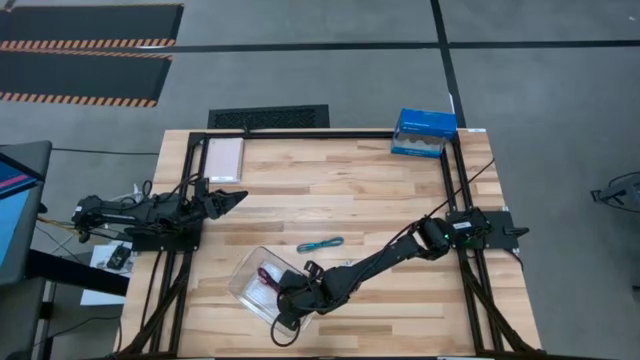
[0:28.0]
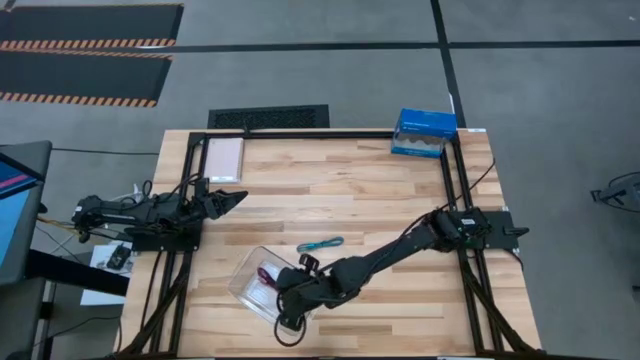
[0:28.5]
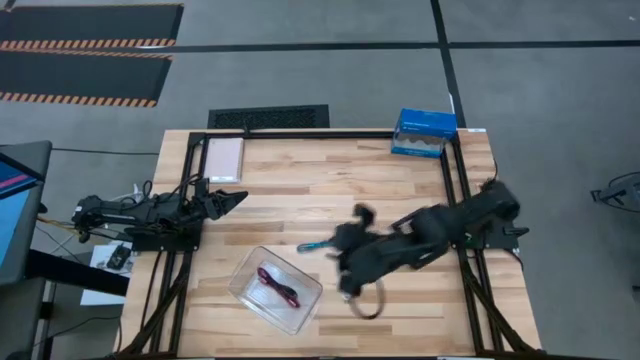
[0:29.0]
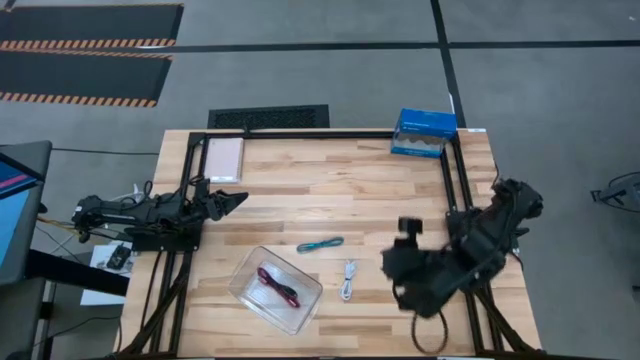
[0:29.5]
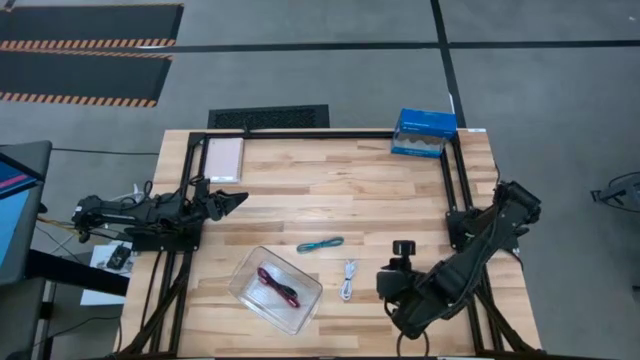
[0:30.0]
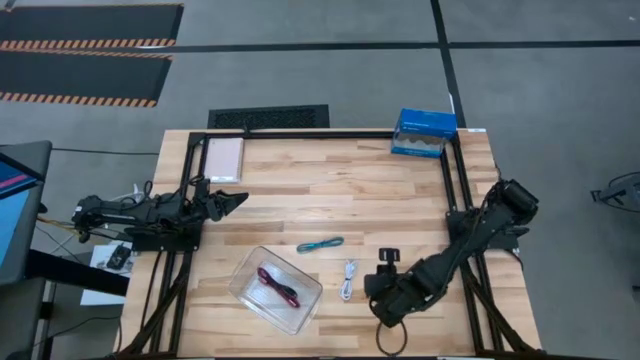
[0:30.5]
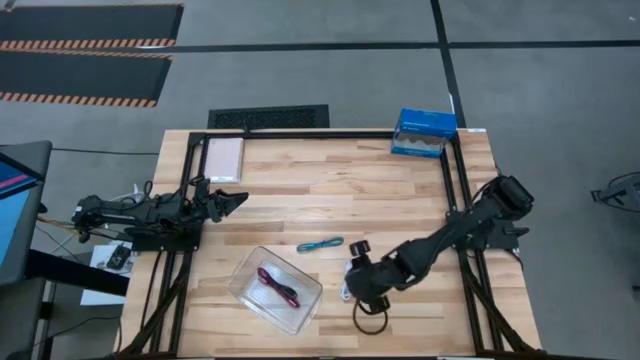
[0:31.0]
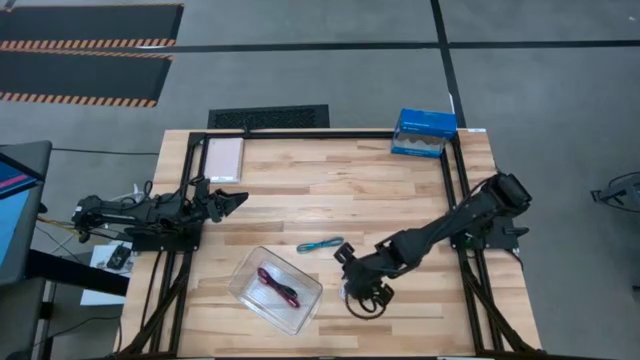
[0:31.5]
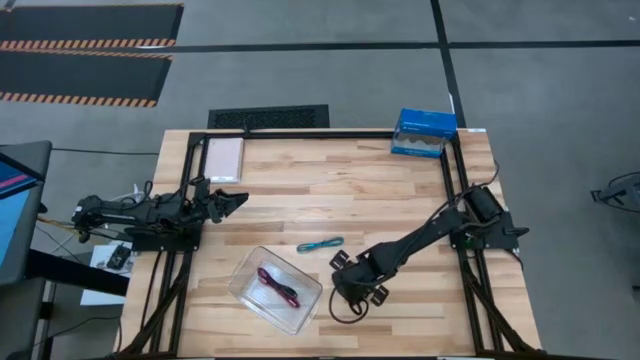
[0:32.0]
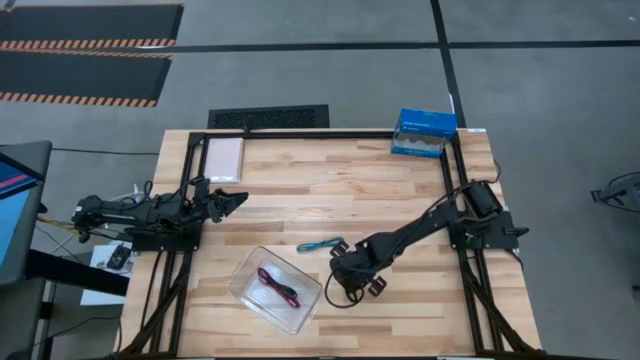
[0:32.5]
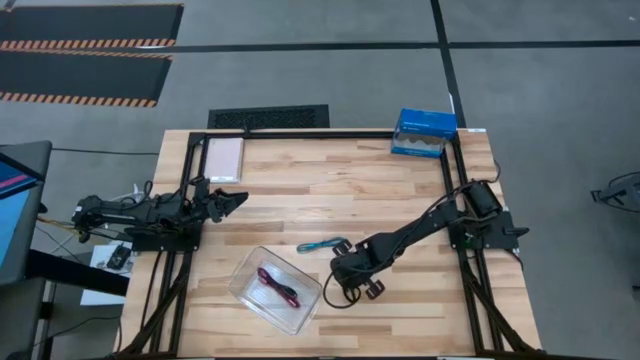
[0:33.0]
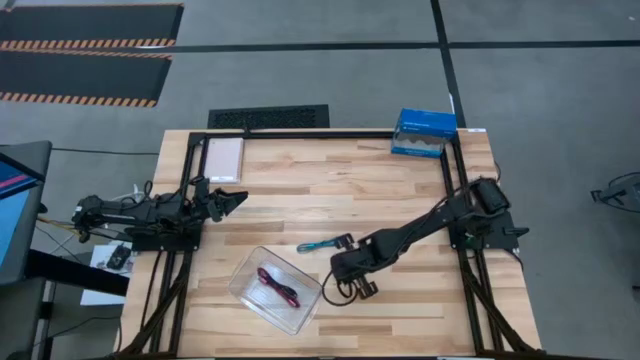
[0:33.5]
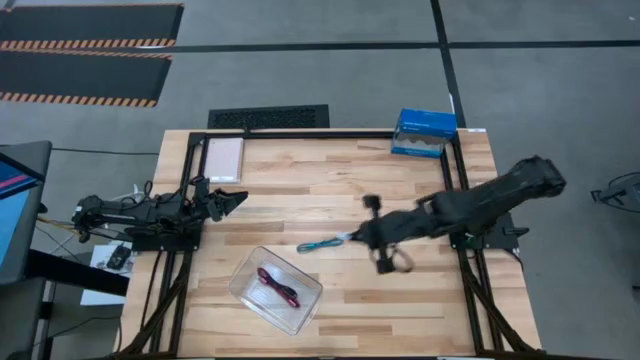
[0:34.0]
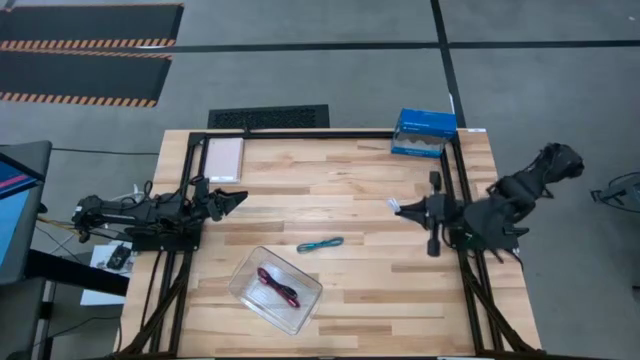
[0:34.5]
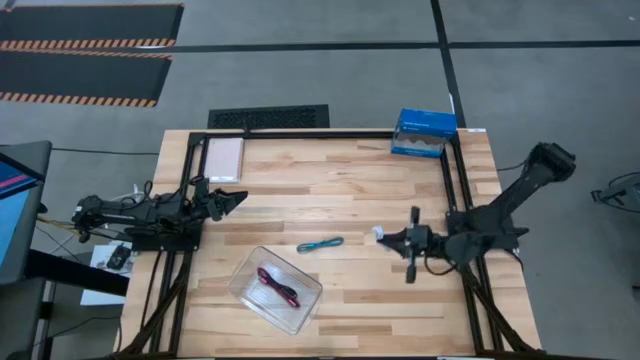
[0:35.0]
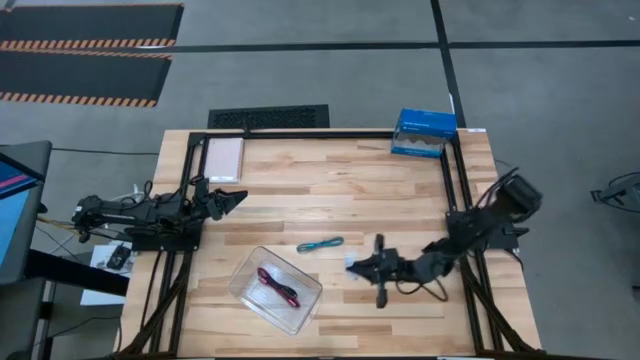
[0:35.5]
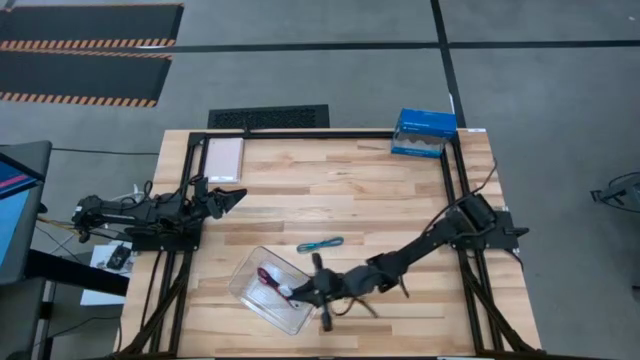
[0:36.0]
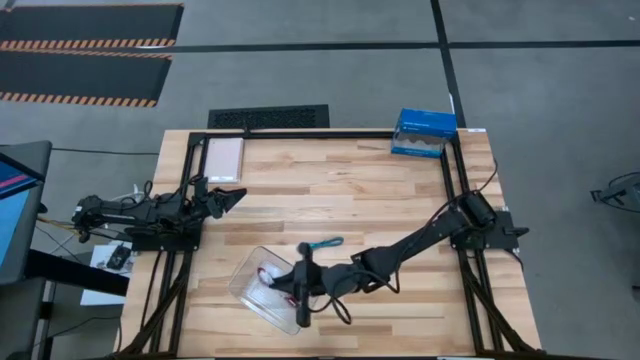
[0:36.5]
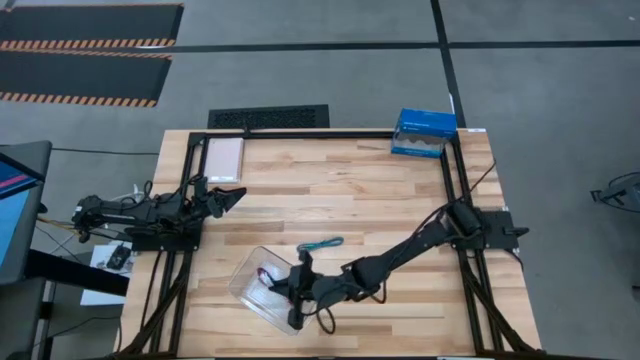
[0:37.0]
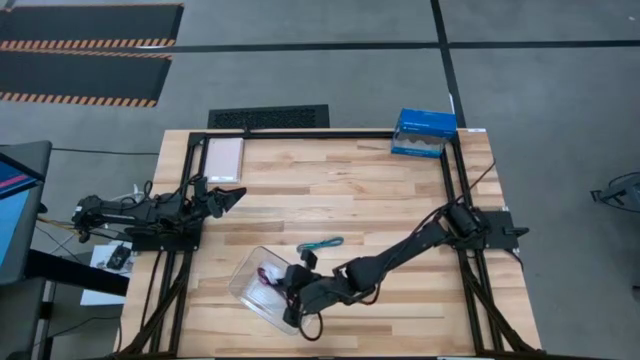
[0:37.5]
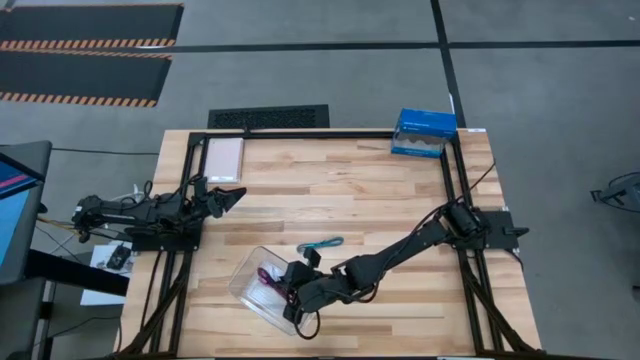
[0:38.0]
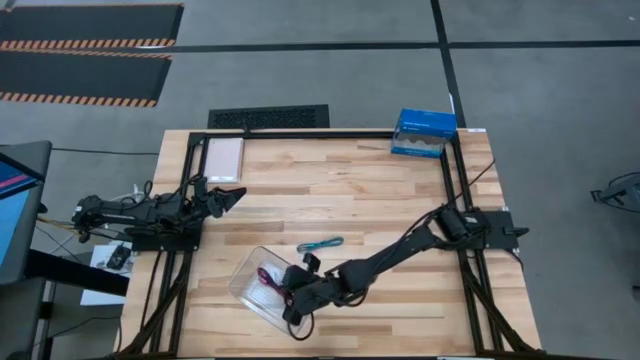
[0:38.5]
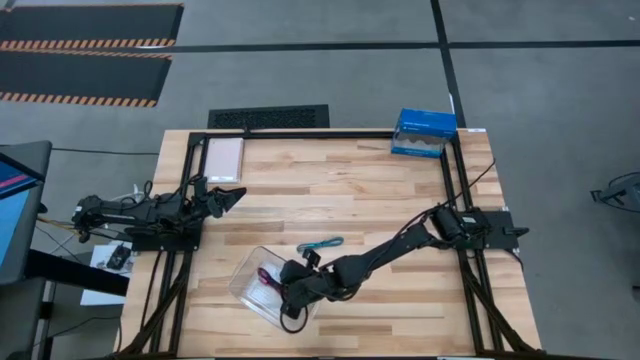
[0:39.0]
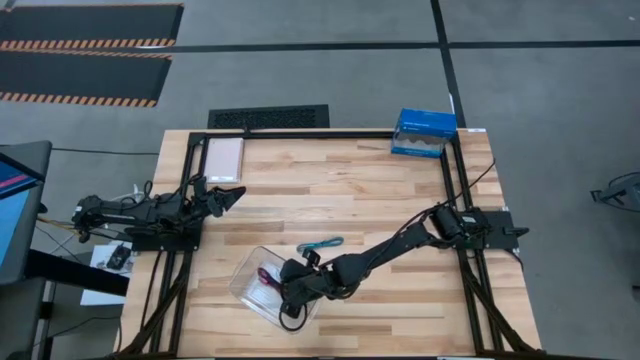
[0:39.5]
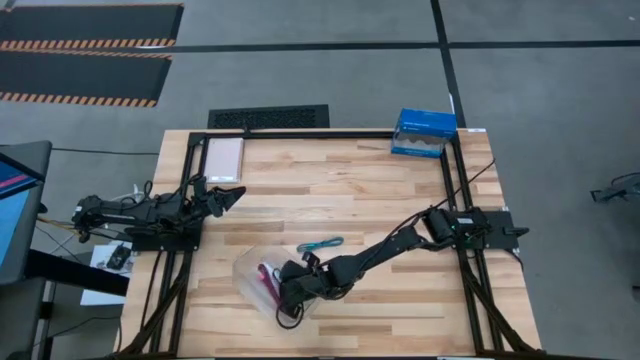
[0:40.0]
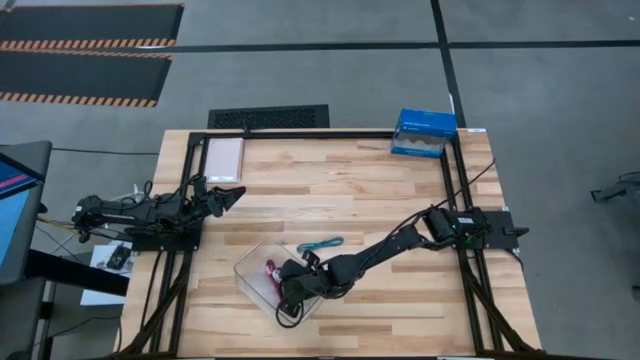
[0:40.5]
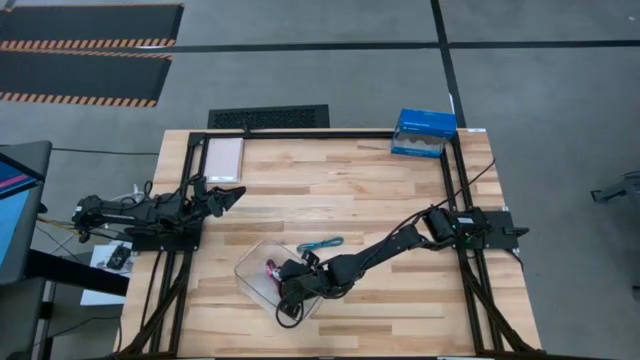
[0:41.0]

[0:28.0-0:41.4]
Task: Pick and place USB-C Cables
Put the white charger cable into the transparent bin

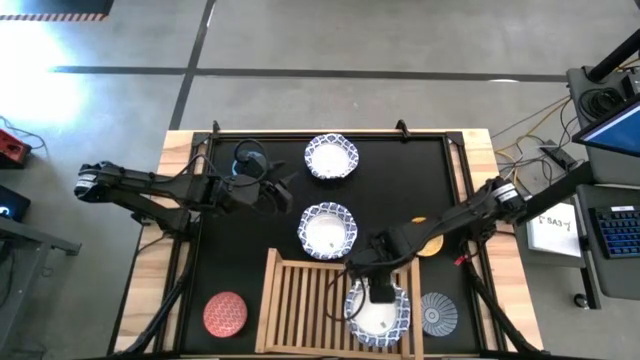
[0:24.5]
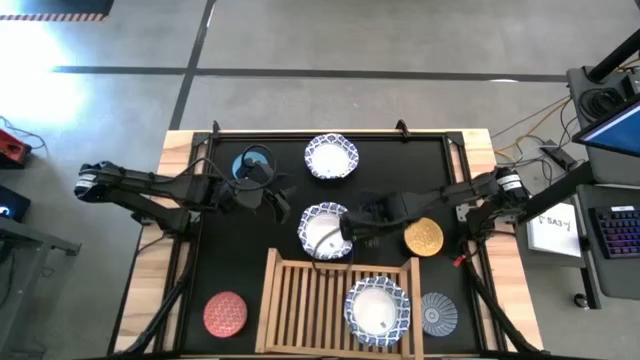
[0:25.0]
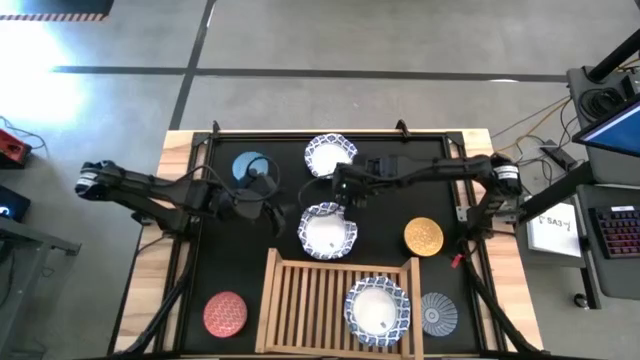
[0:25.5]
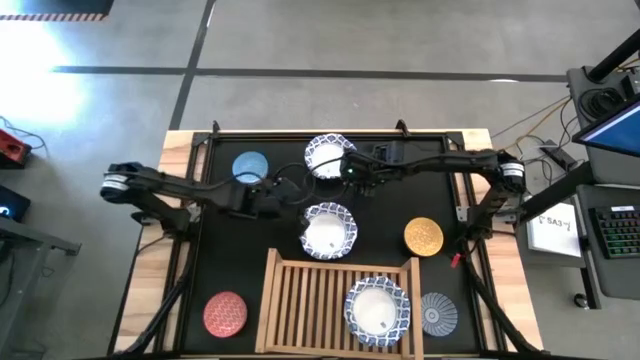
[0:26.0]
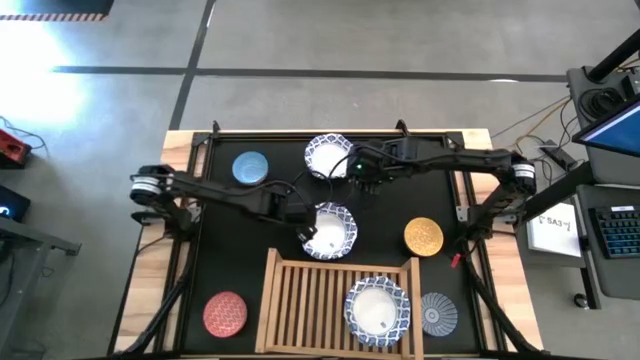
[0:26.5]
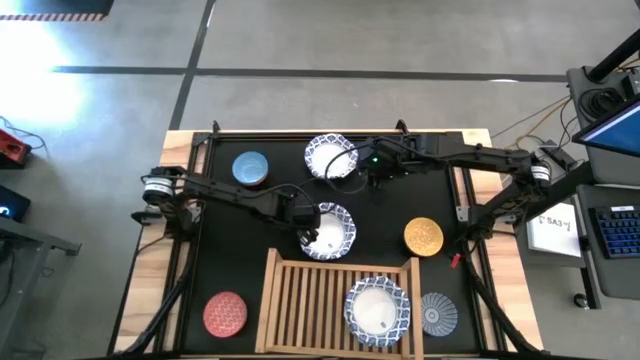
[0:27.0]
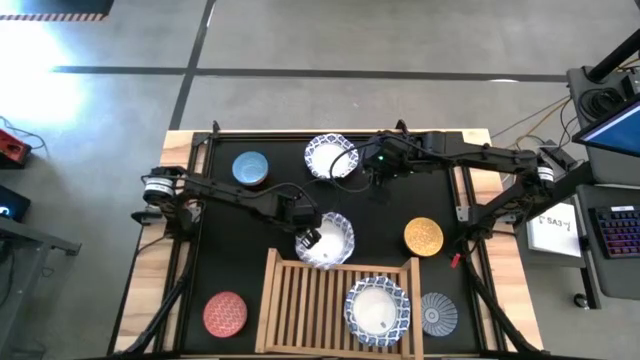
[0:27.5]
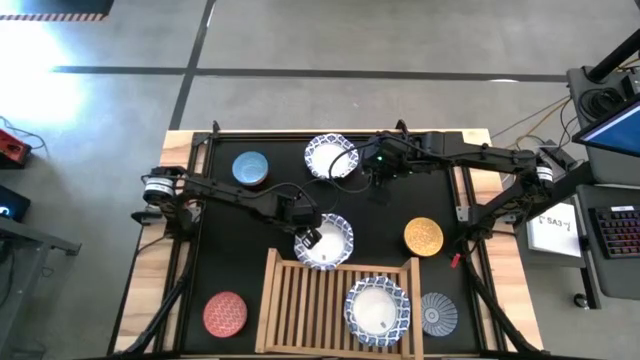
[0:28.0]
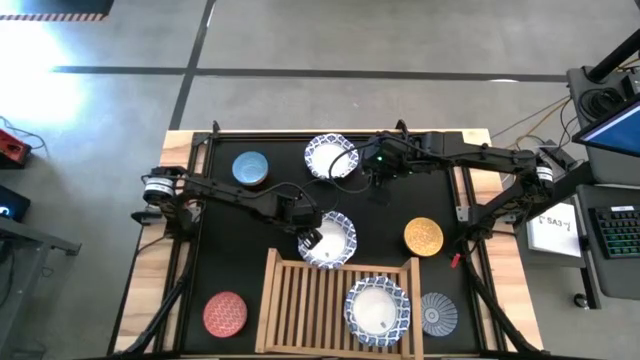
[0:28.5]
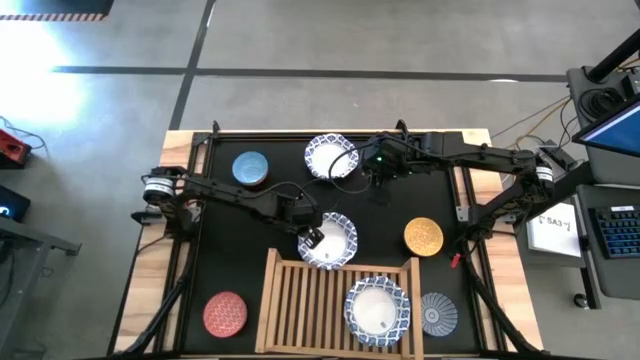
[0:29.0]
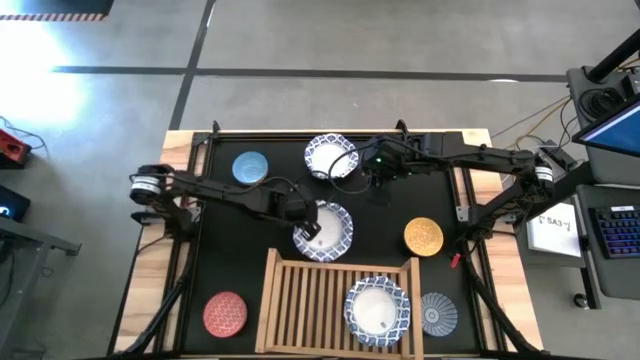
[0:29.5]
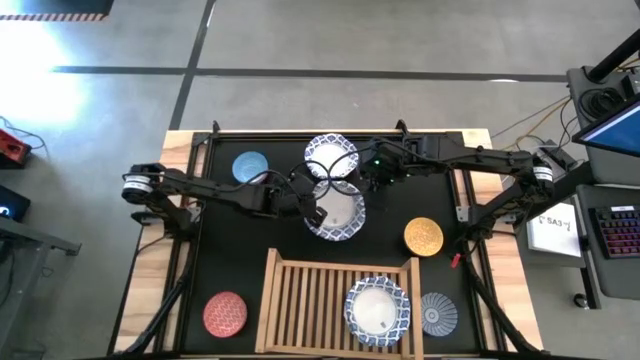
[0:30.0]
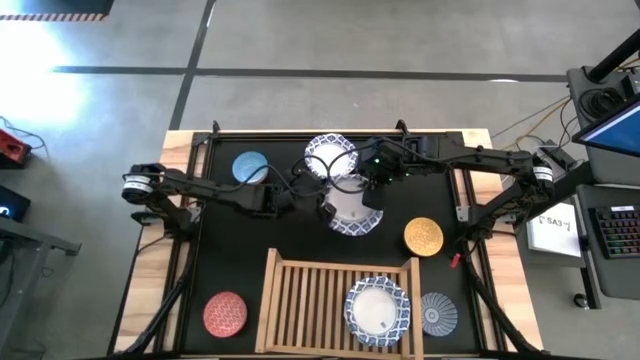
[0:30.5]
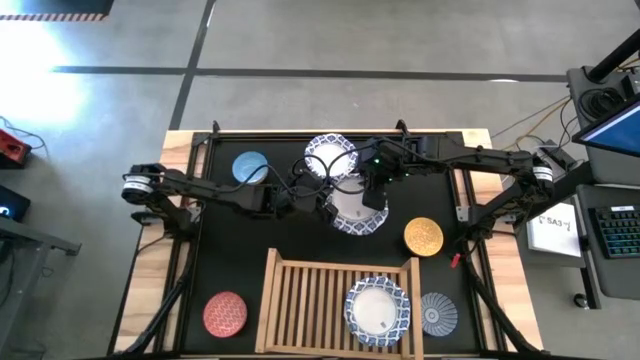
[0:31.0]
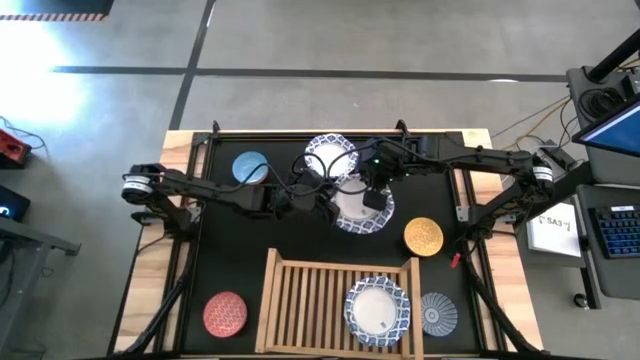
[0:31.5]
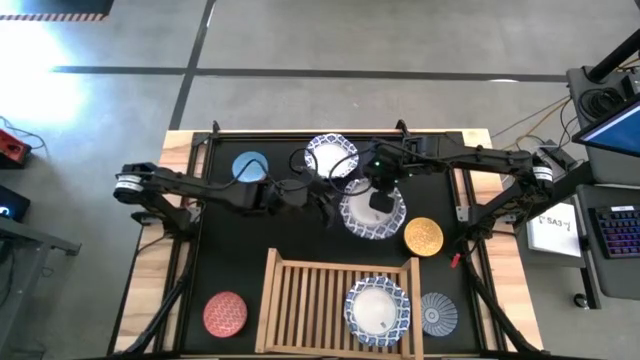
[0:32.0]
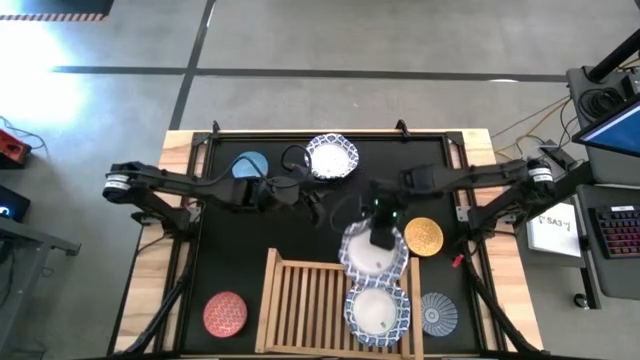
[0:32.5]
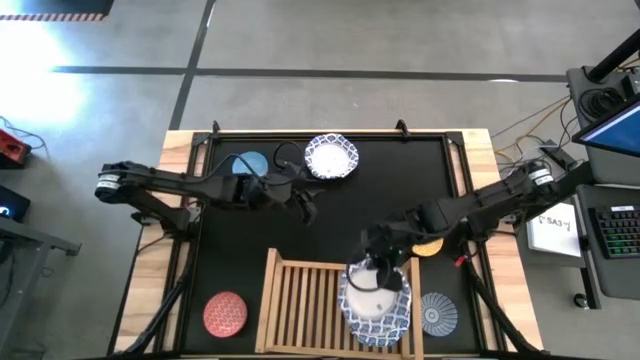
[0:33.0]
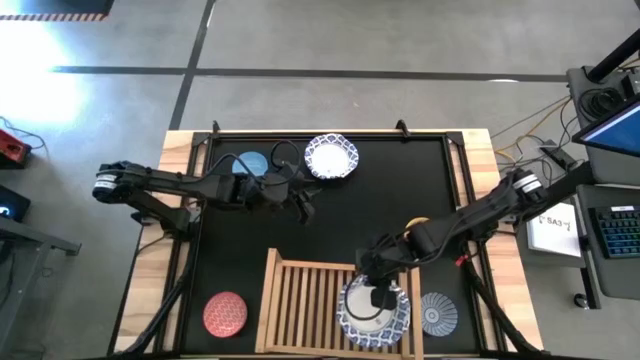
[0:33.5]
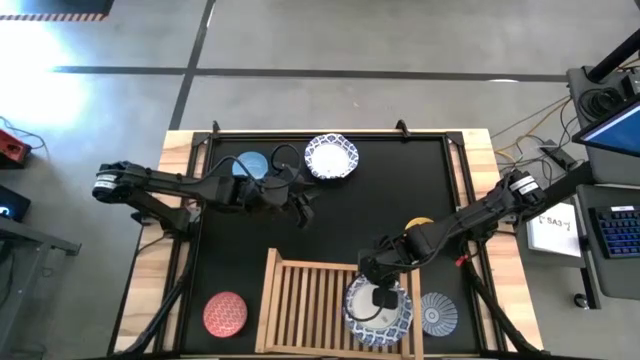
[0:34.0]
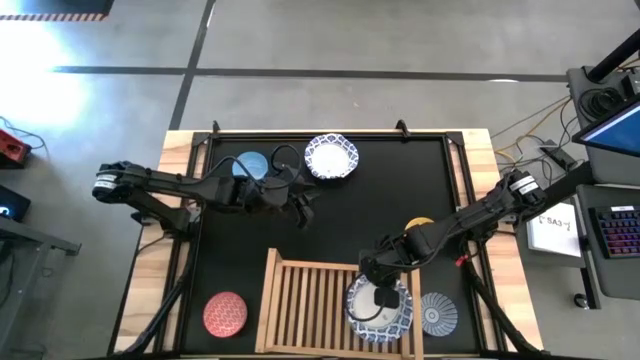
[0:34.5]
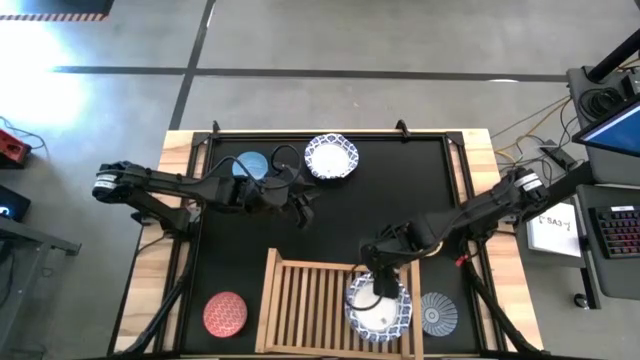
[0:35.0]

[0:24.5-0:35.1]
Task: Place and stack bowls onto a shelf
Stack the white patterned bowl on top of the white patterned bowl on the shelf
